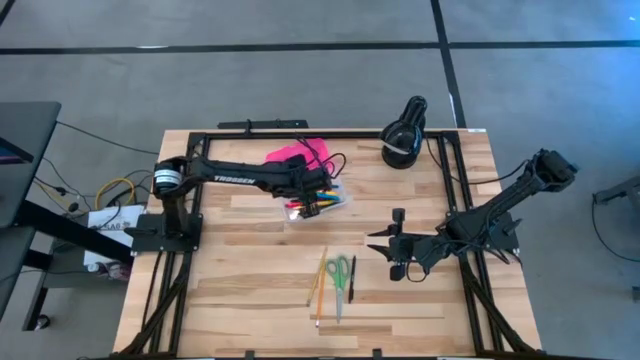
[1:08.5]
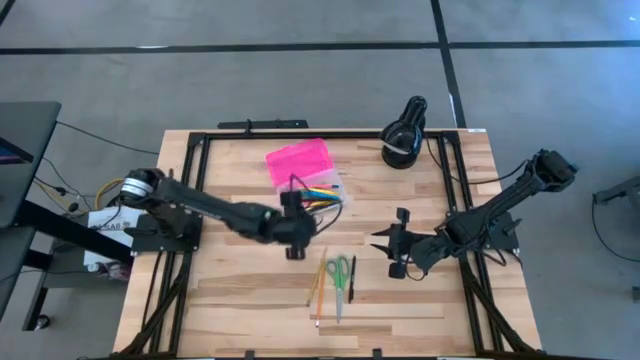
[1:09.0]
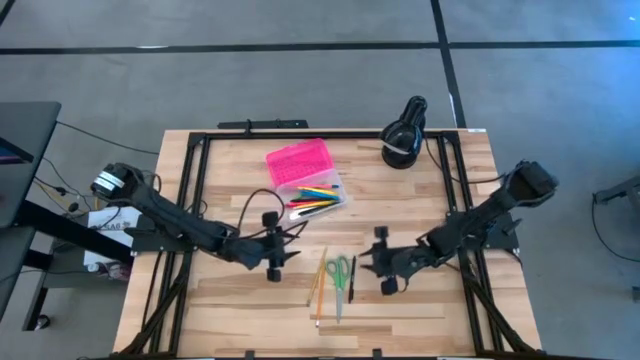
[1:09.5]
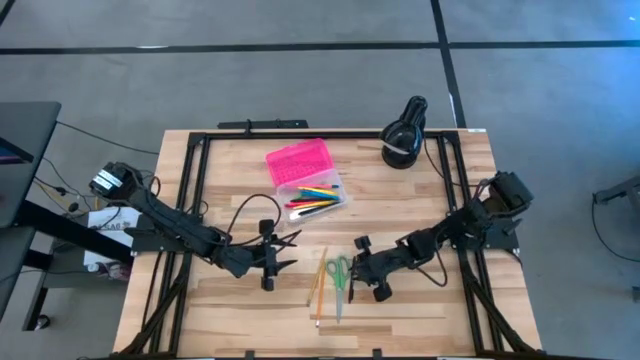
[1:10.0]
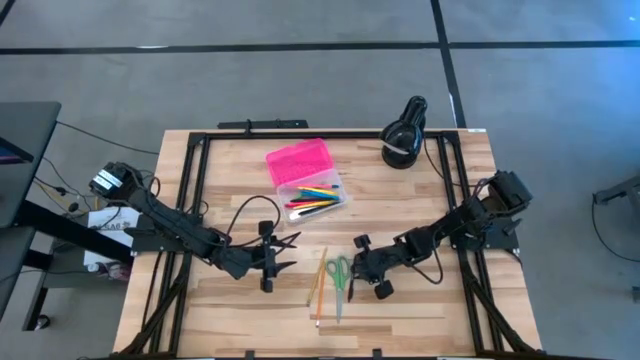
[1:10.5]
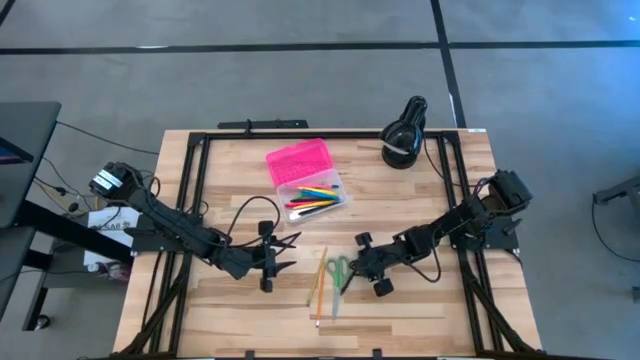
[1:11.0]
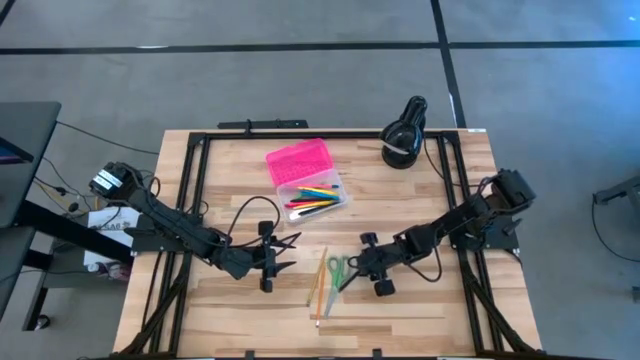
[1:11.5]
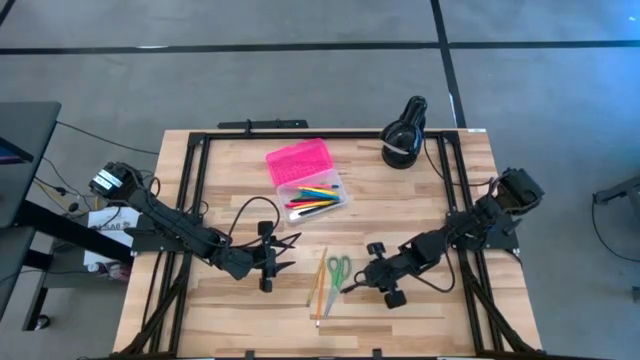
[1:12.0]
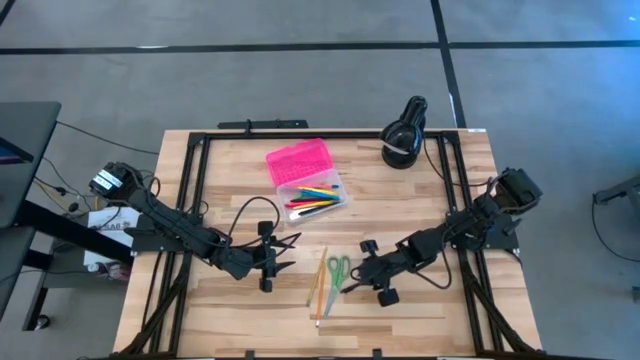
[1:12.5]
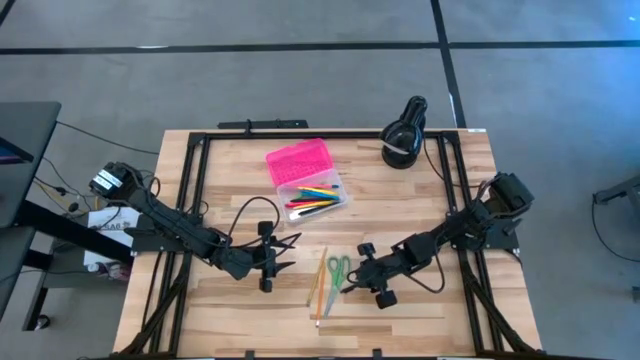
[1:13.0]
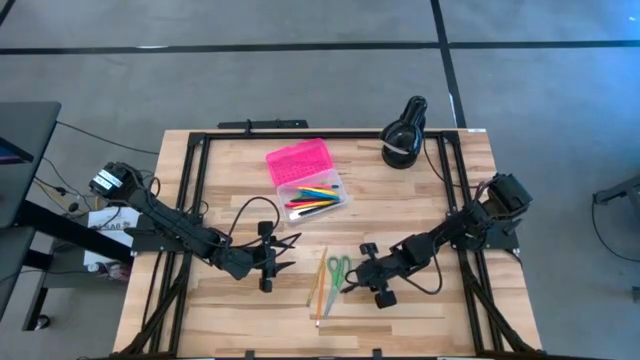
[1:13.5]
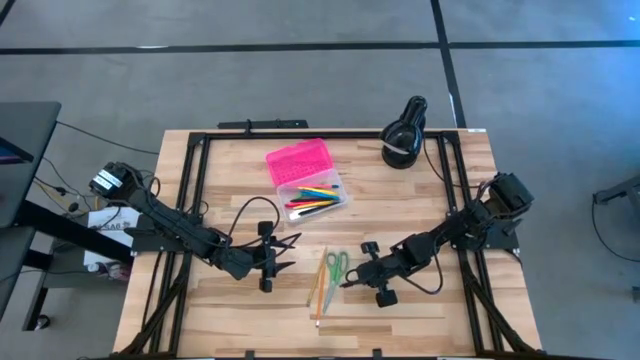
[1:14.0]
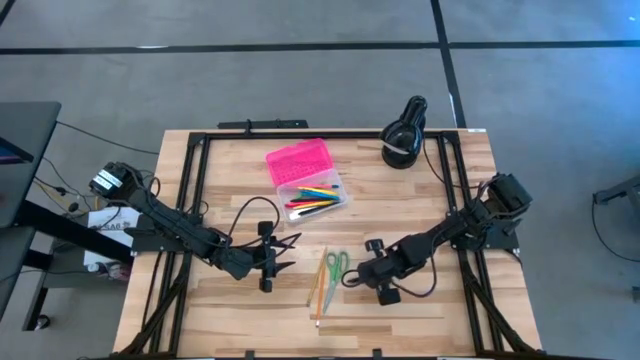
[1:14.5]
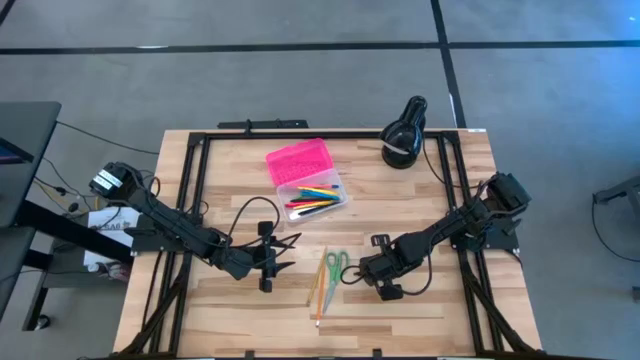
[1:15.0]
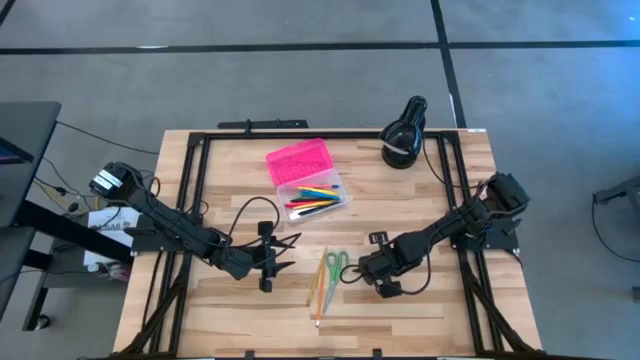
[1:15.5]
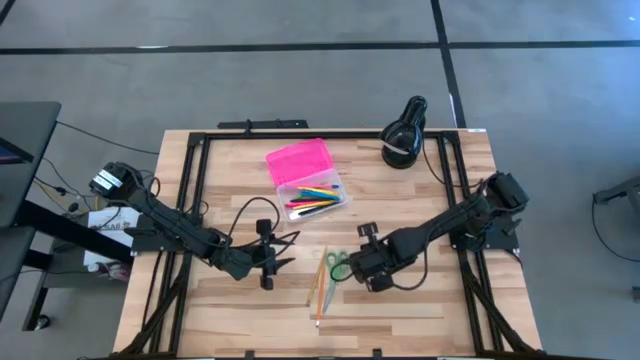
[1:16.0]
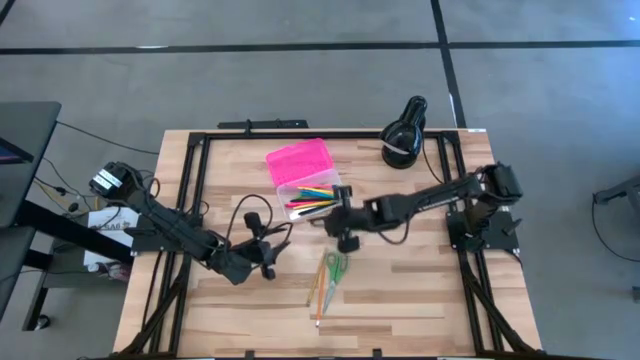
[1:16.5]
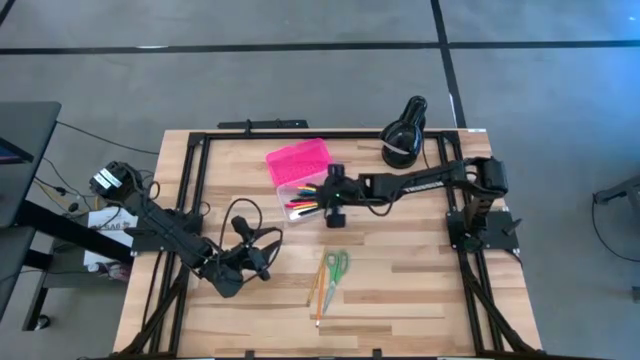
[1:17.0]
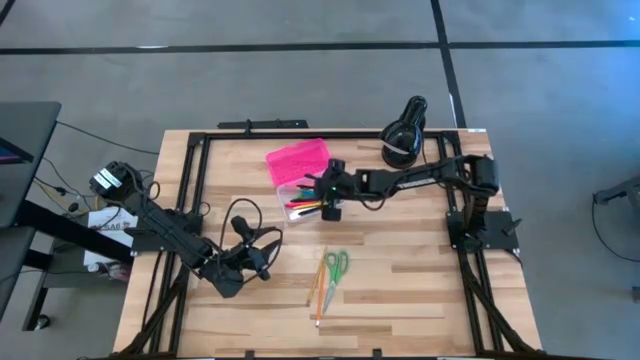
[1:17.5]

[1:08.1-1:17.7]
Task: Pick & place school supplies into a supply box
Put the black pen into the pink supply box

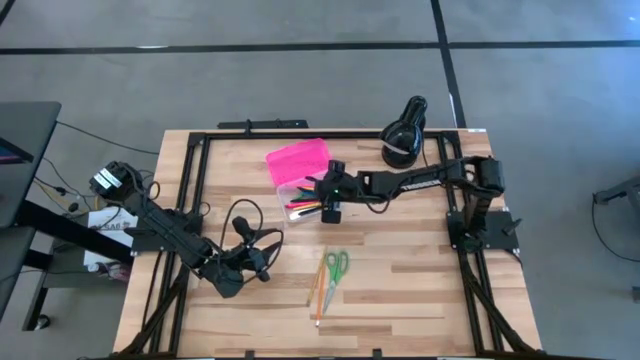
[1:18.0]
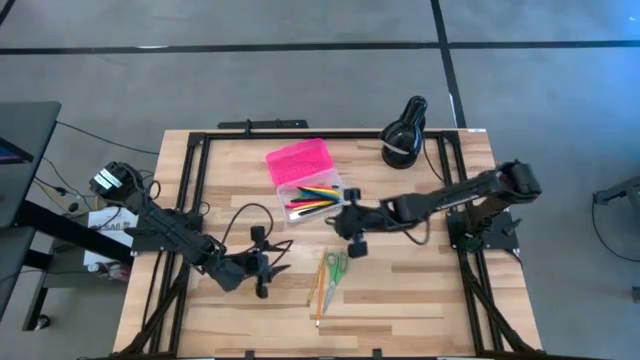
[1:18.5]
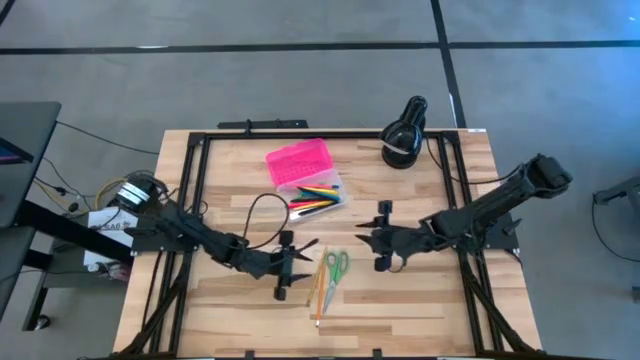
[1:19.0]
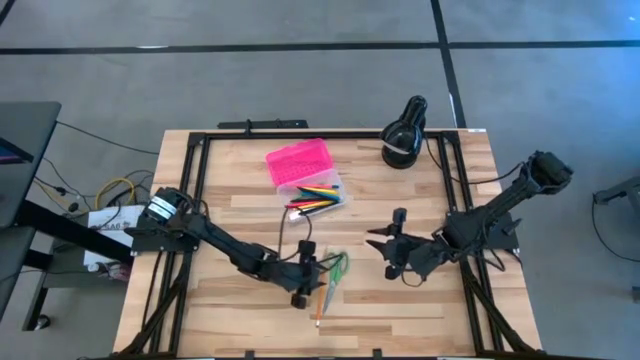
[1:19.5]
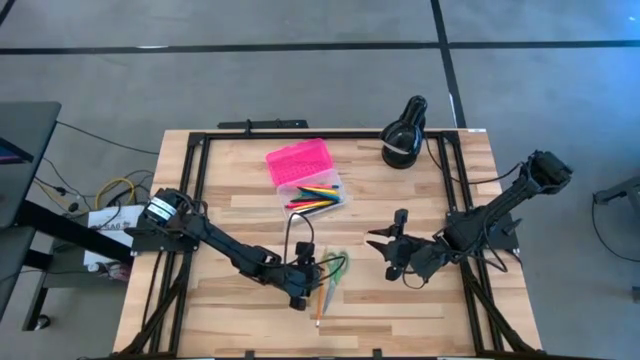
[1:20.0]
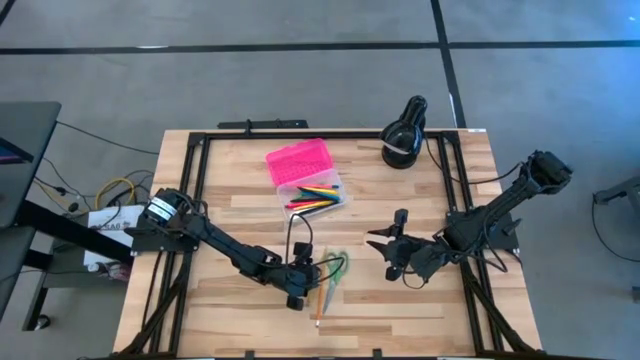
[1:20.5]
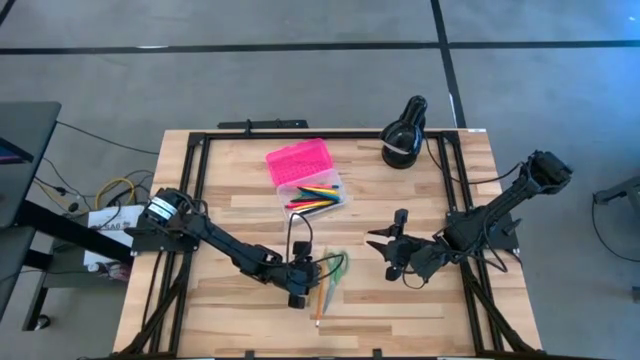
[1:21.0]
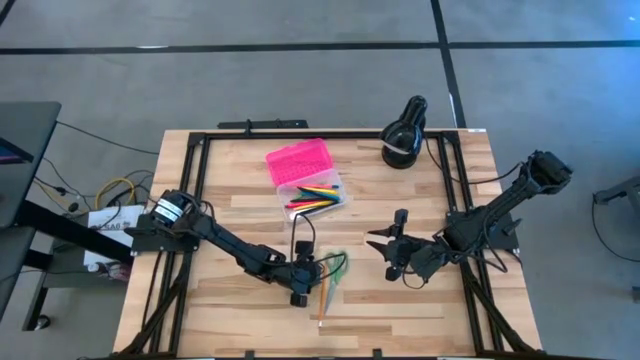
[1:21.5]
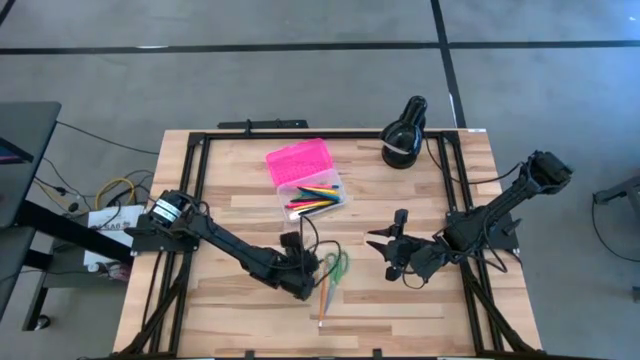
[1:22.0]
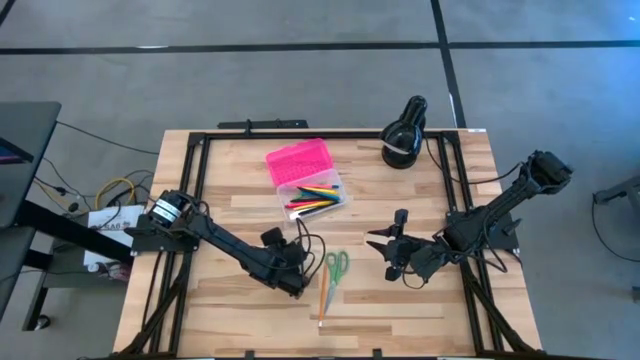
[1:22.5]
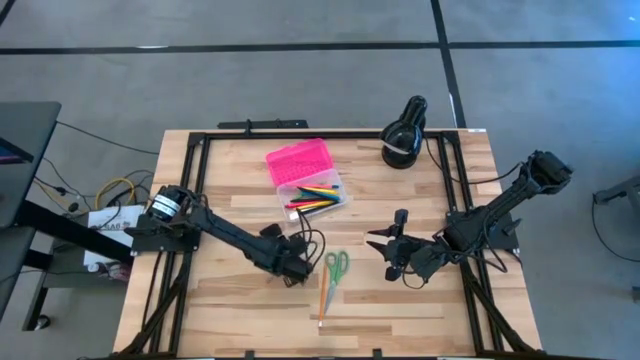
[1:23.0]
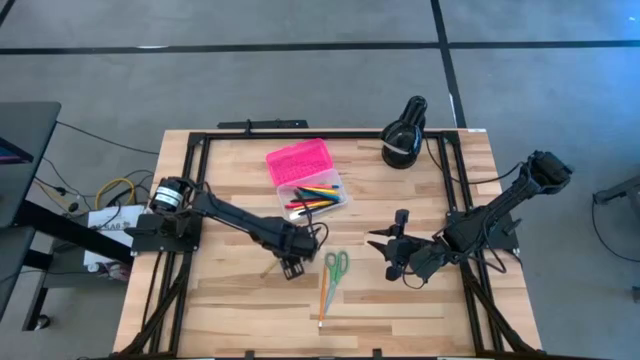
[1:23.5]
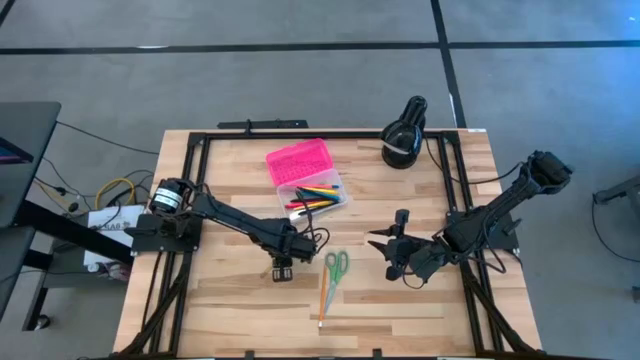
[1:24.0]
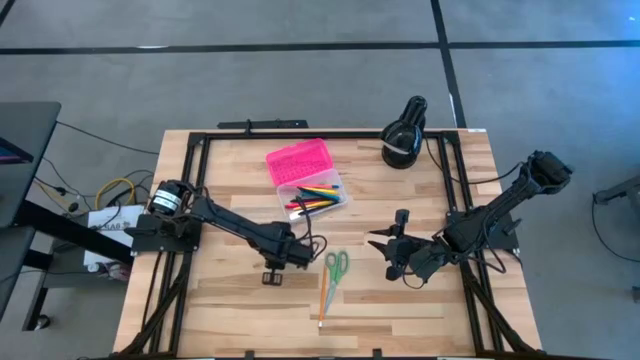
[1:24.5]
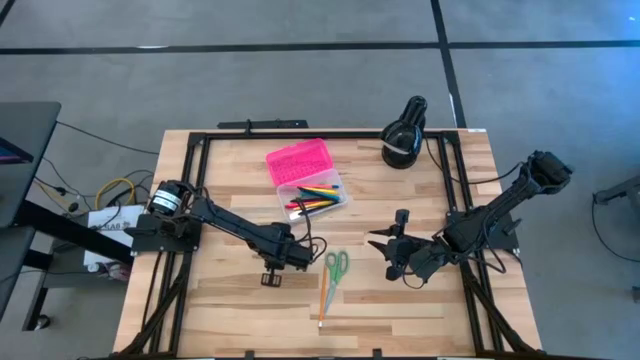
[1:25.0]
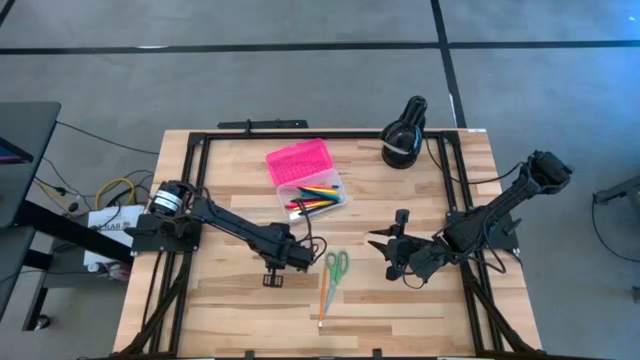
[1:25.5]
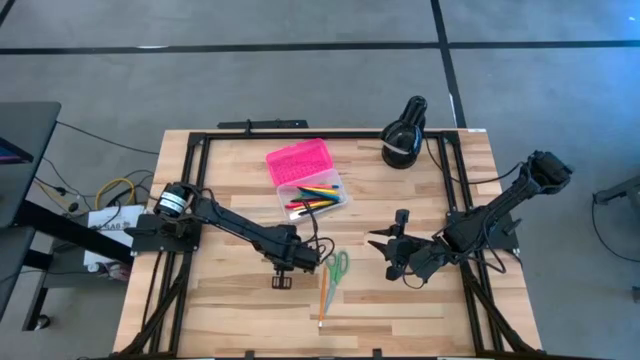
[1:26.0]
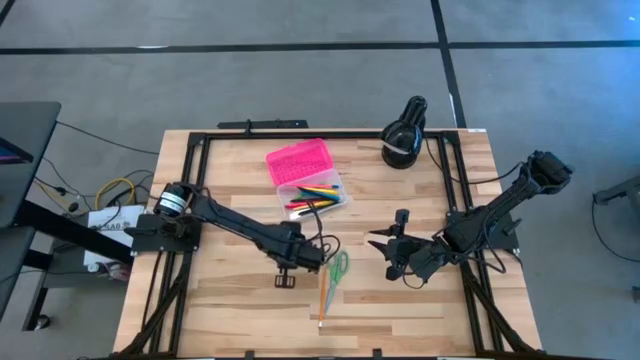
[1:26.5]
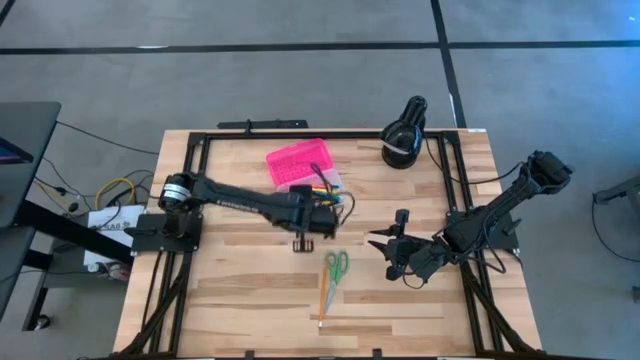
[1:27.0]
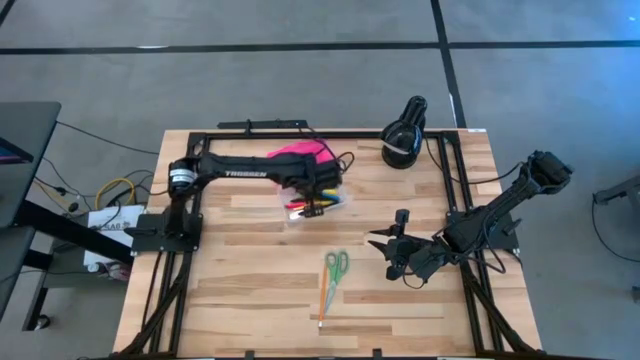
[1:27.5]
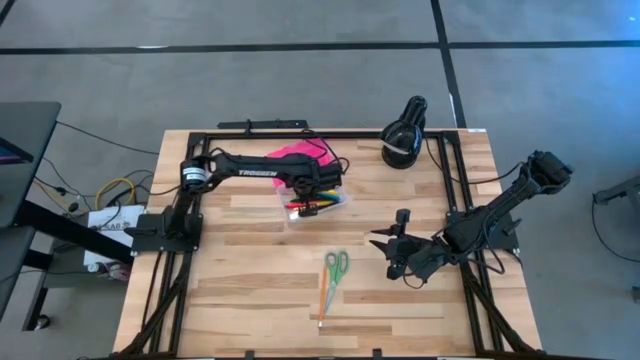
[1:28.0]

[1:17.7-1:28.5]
Put the yellow pencil into the pink supply box

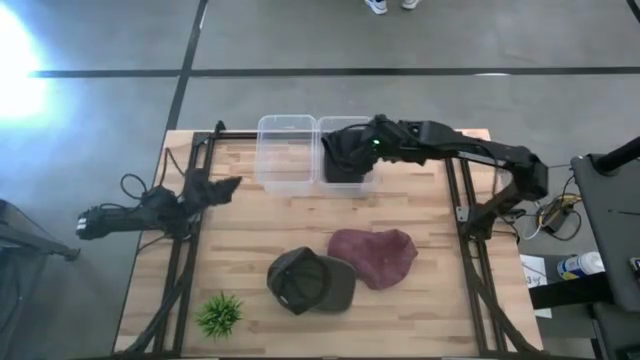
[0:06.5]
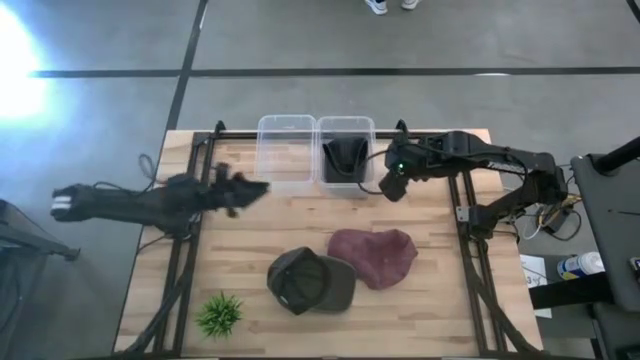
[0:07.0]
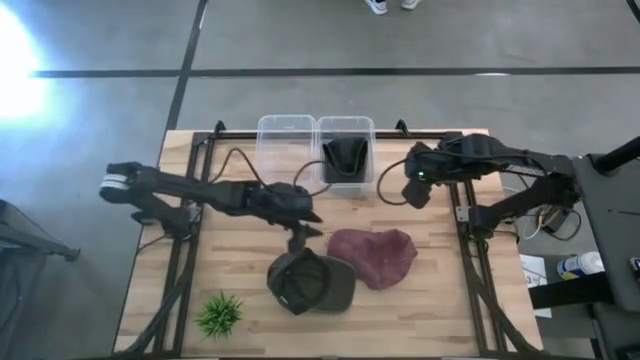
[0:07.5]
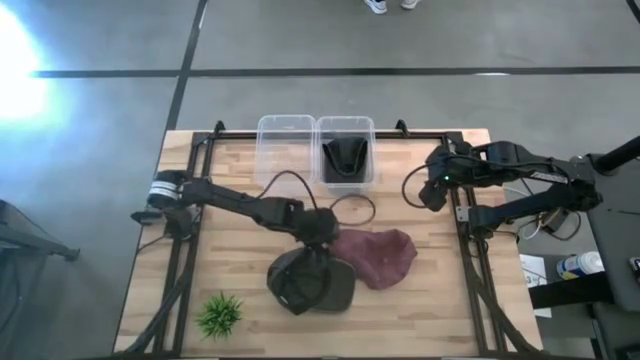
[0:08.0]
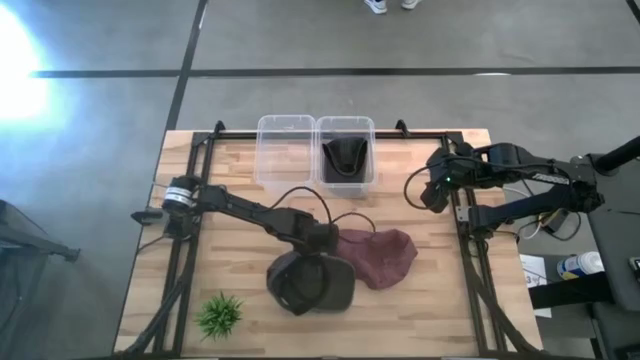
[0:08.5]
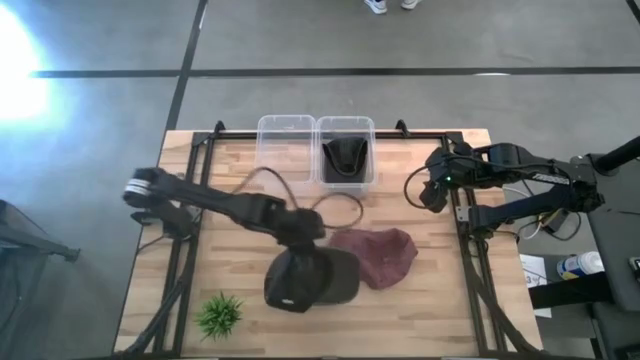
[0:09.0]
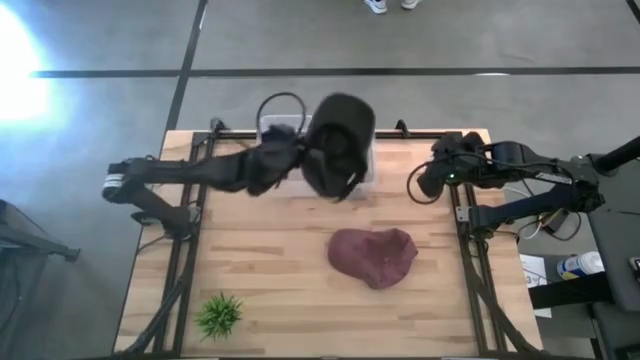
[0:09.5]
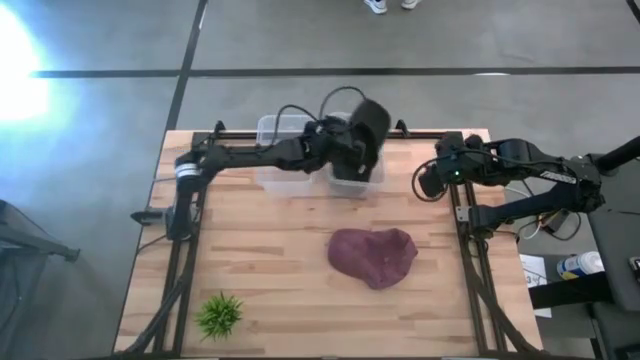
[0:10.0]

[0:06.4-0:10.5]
Task: Pick & Place hat
Put the black cap into the right transparent bin
